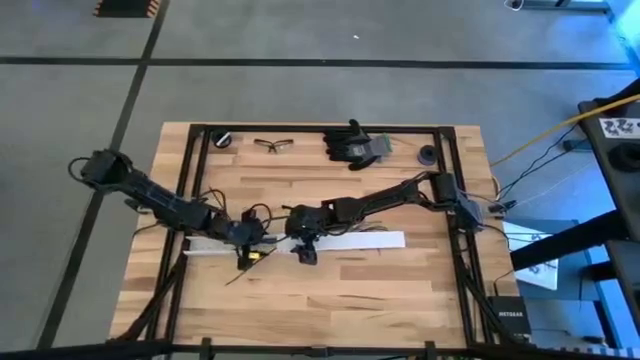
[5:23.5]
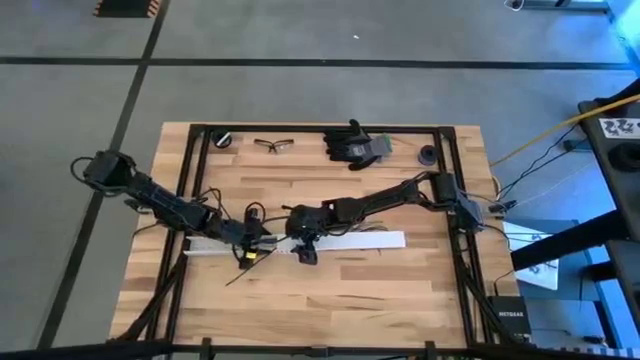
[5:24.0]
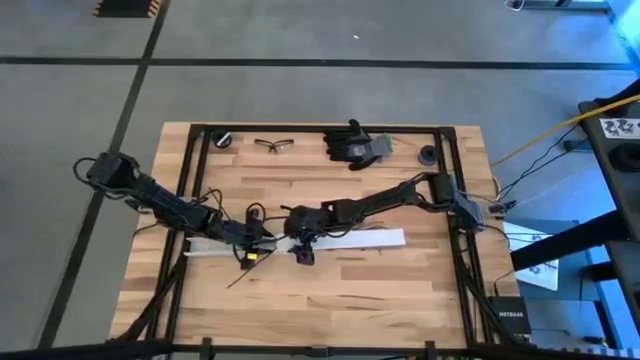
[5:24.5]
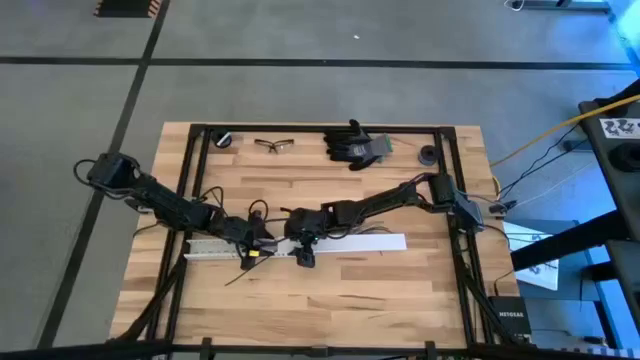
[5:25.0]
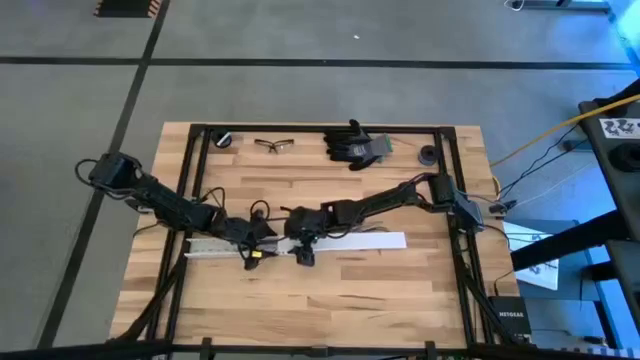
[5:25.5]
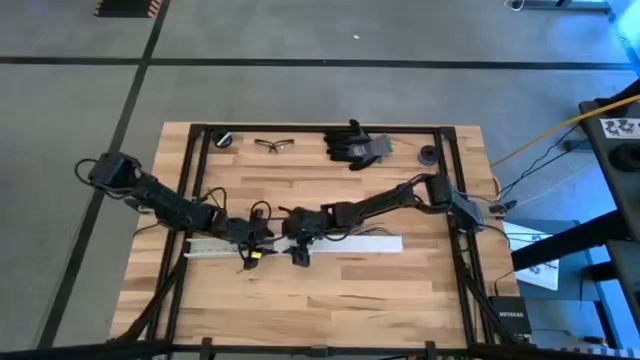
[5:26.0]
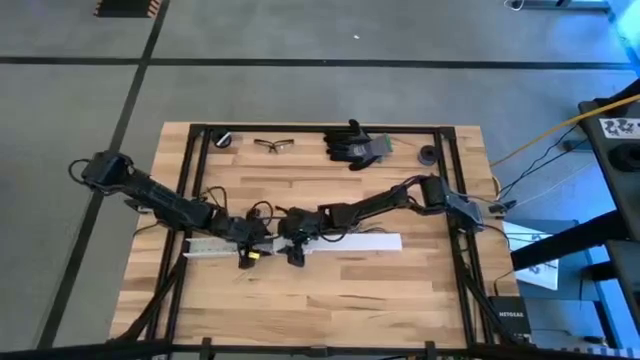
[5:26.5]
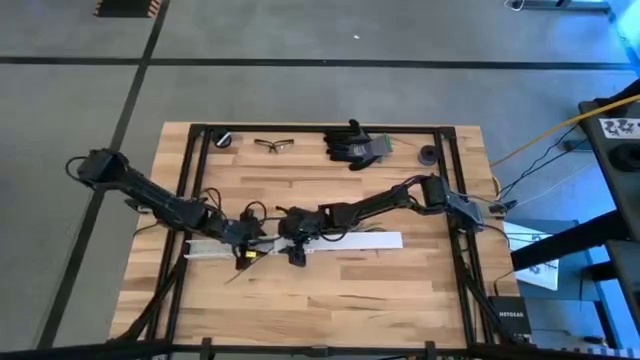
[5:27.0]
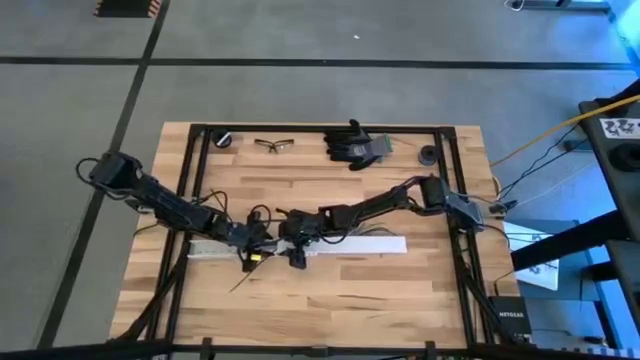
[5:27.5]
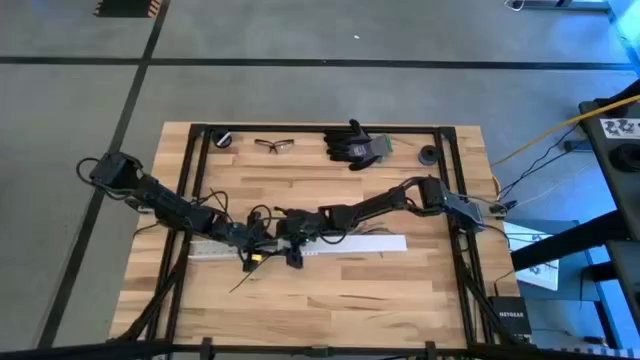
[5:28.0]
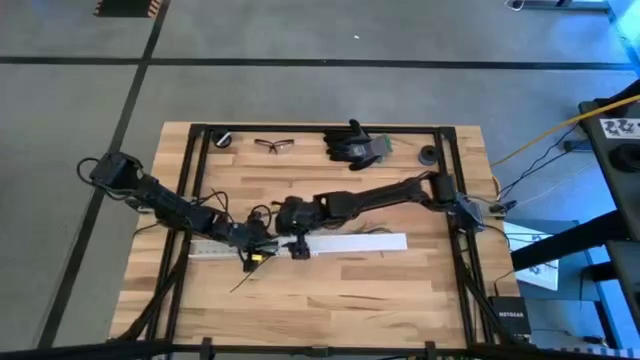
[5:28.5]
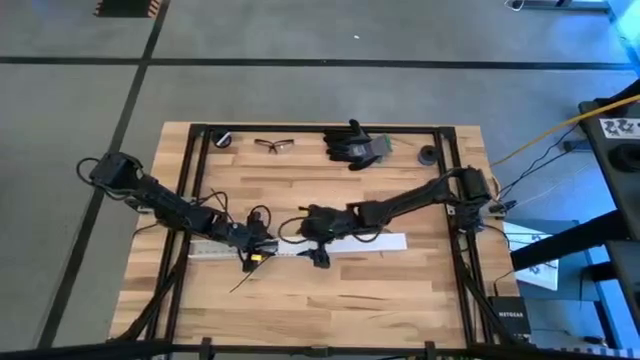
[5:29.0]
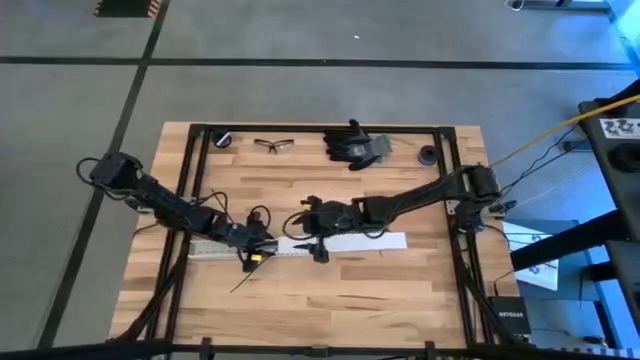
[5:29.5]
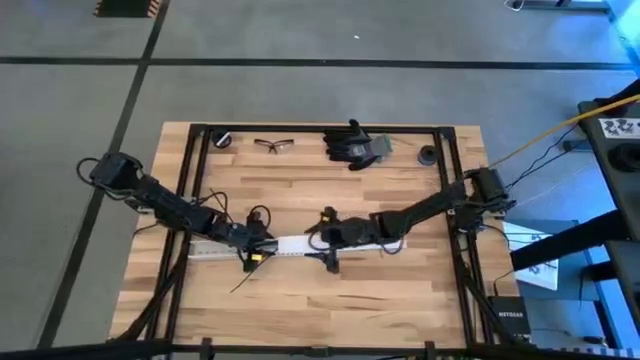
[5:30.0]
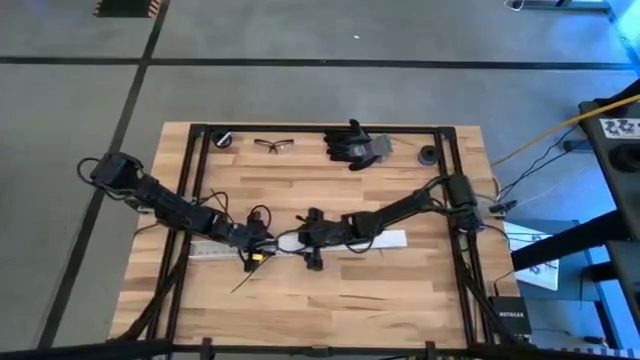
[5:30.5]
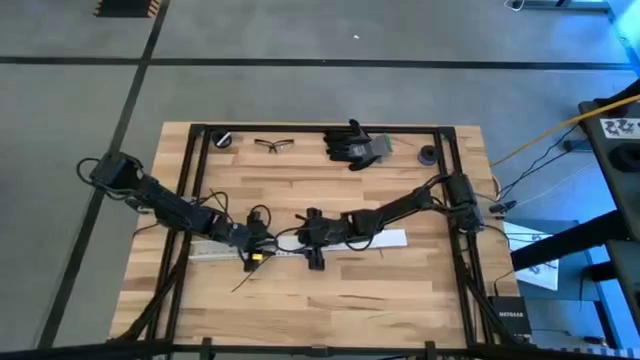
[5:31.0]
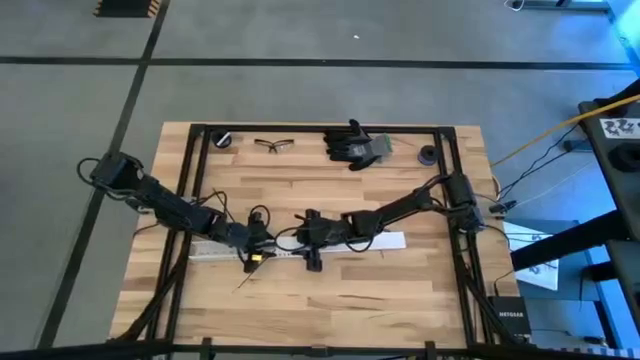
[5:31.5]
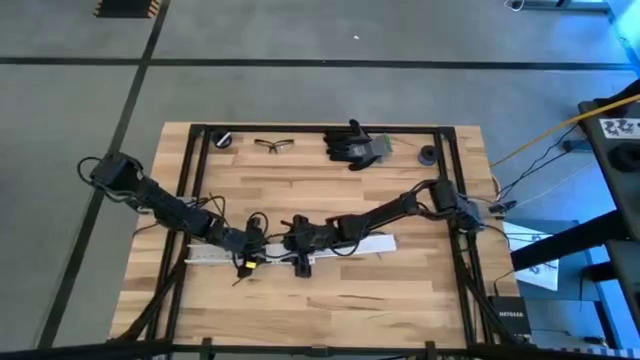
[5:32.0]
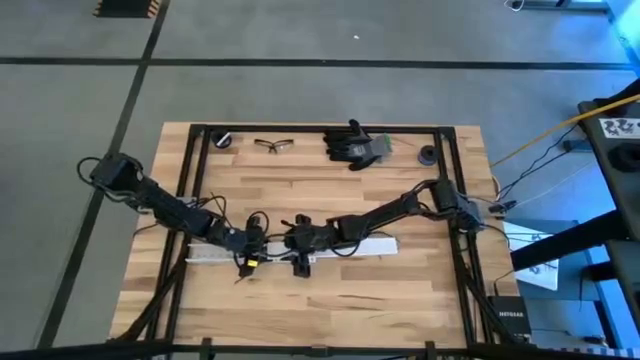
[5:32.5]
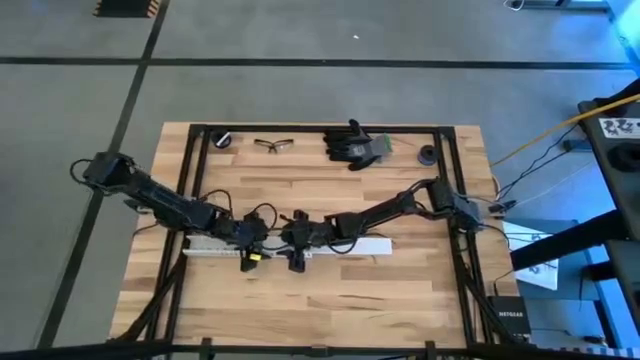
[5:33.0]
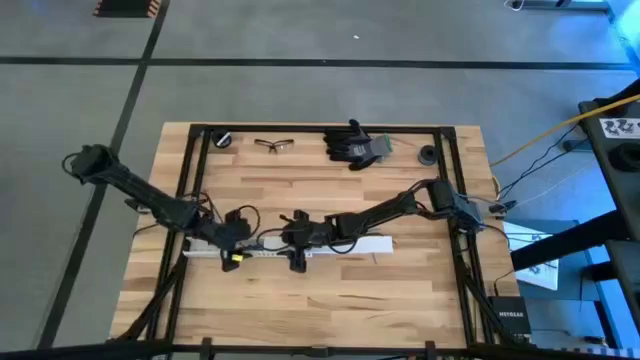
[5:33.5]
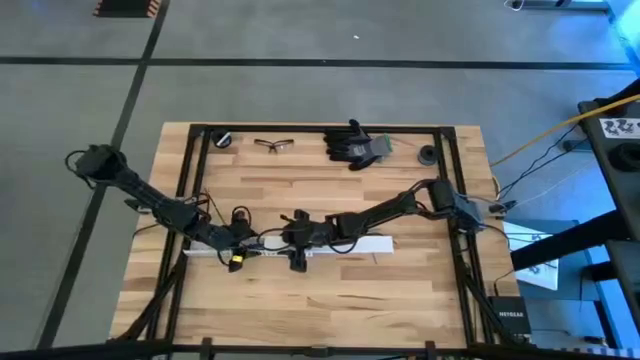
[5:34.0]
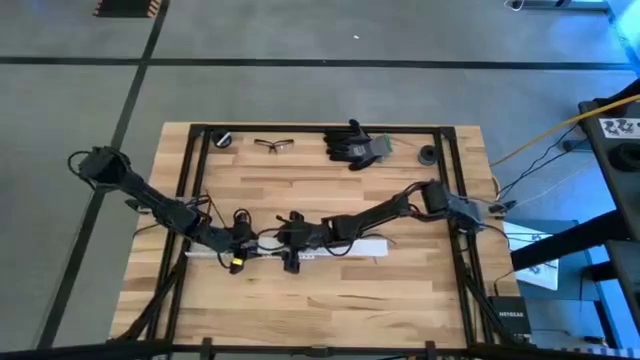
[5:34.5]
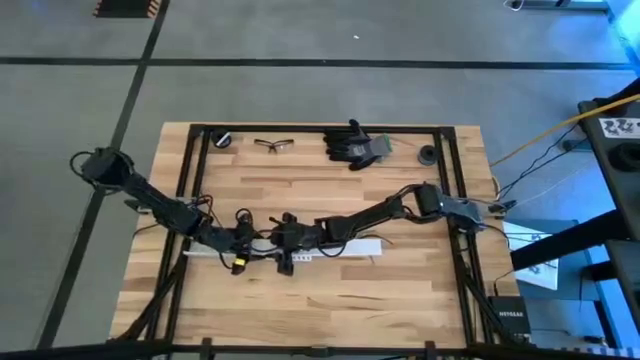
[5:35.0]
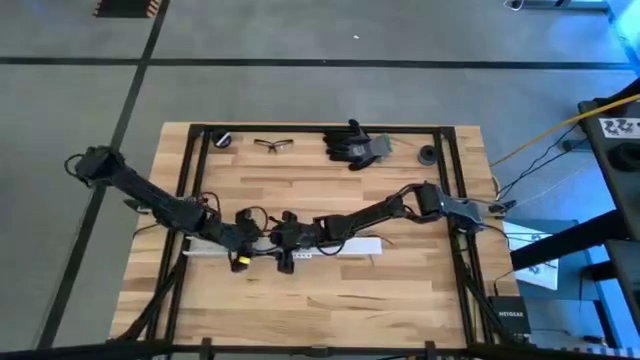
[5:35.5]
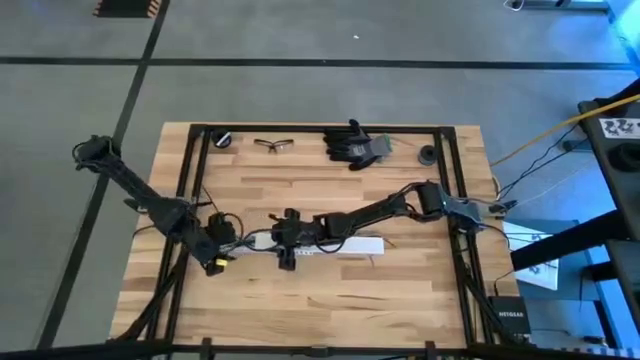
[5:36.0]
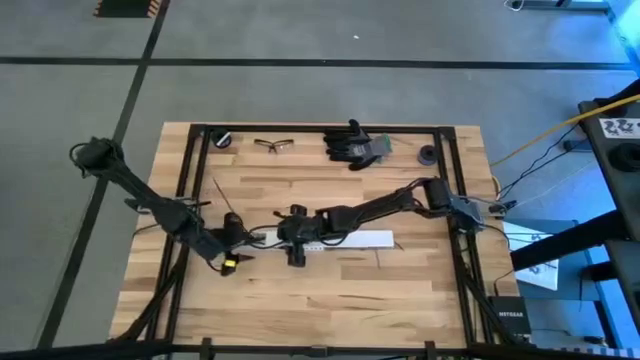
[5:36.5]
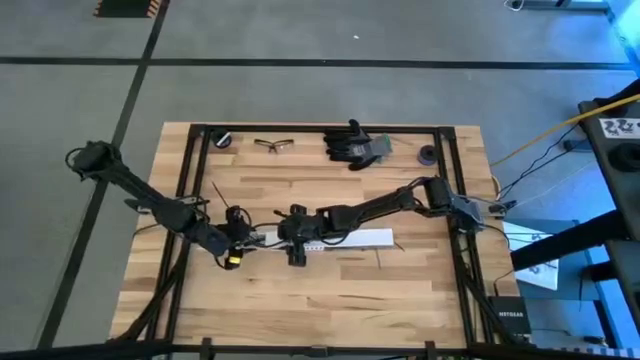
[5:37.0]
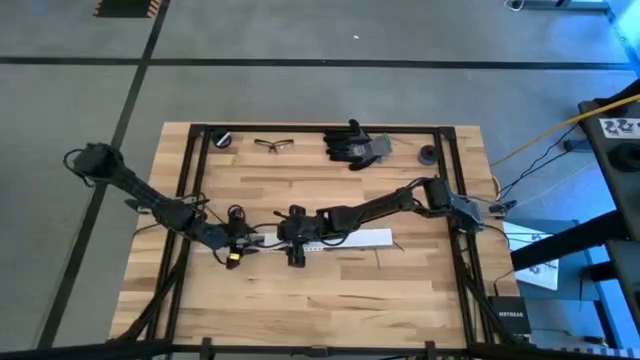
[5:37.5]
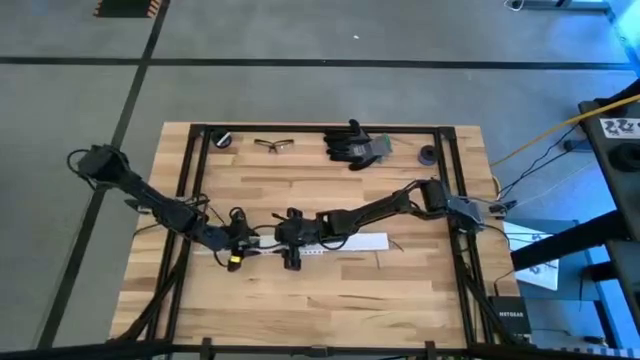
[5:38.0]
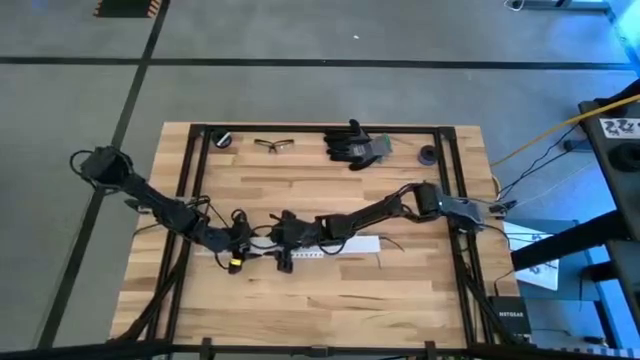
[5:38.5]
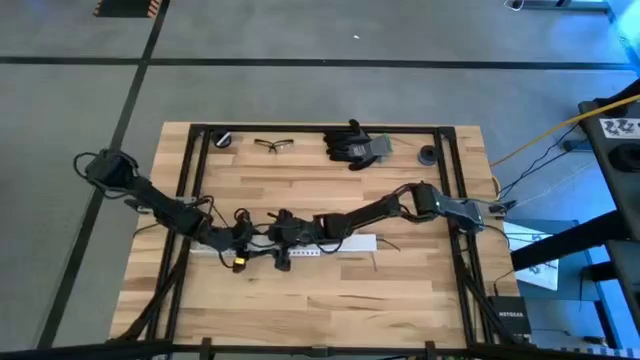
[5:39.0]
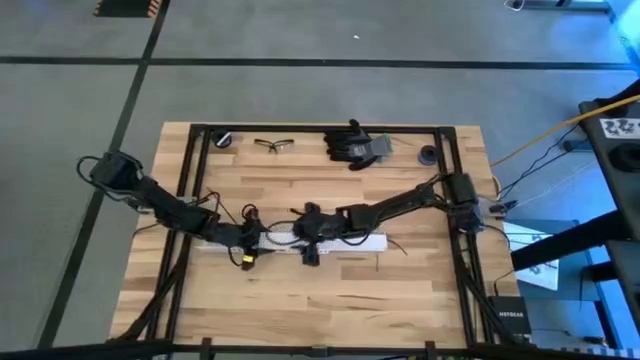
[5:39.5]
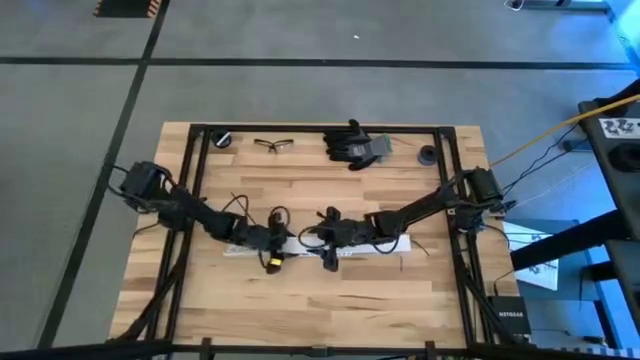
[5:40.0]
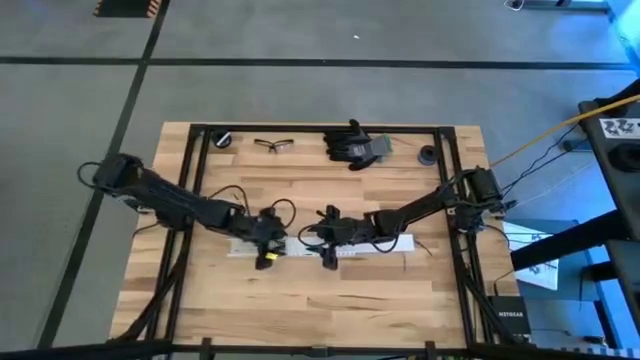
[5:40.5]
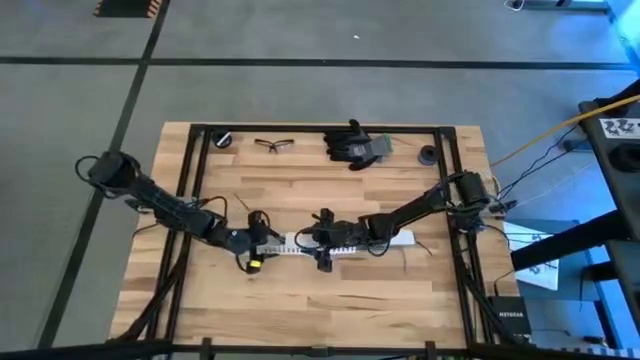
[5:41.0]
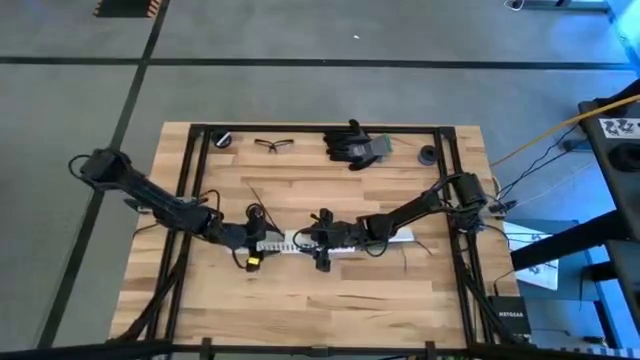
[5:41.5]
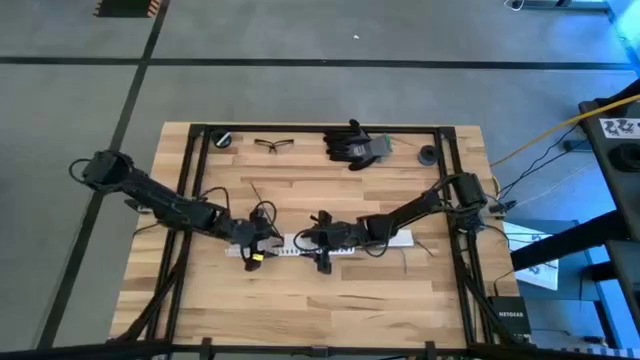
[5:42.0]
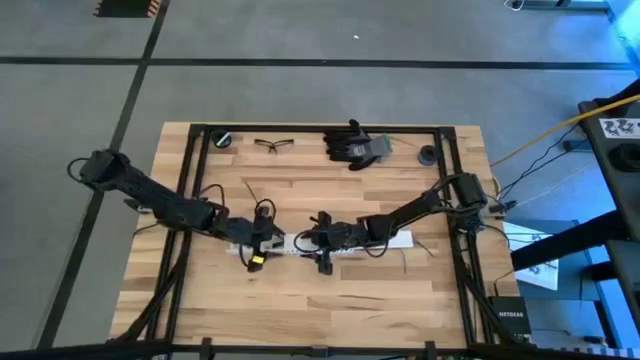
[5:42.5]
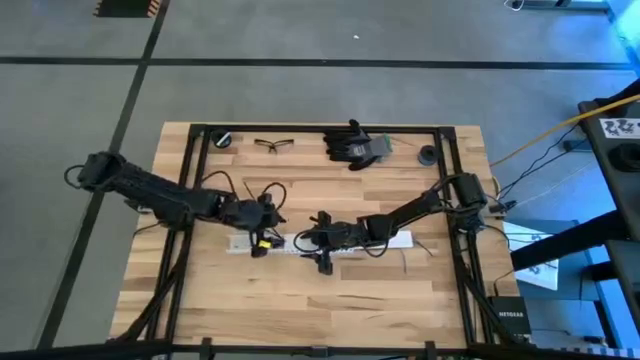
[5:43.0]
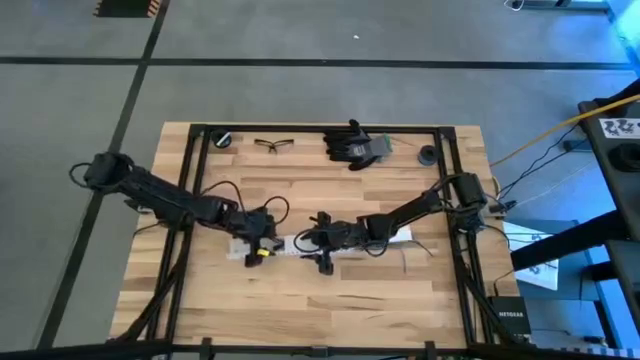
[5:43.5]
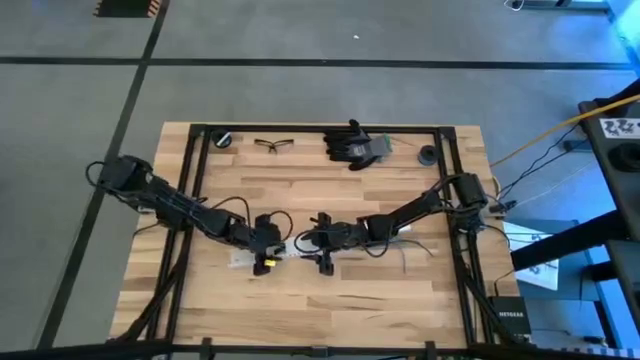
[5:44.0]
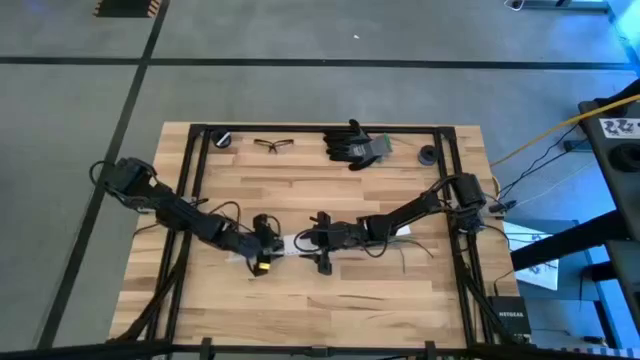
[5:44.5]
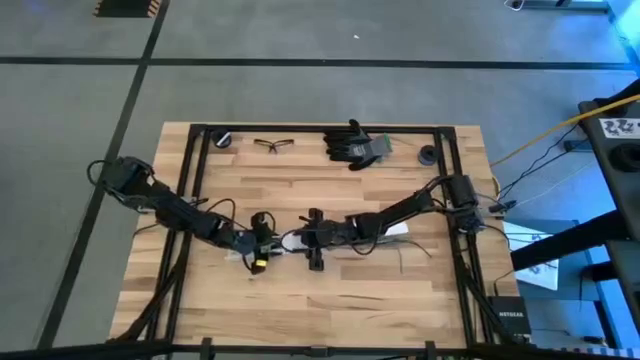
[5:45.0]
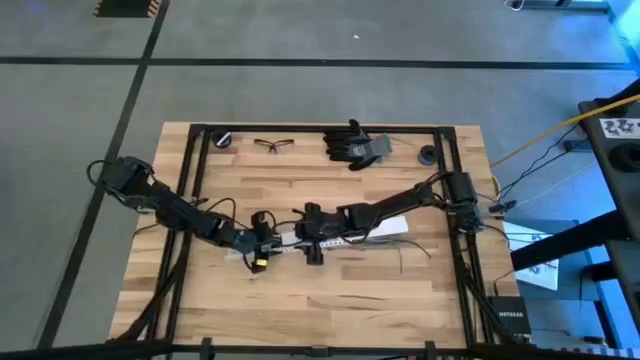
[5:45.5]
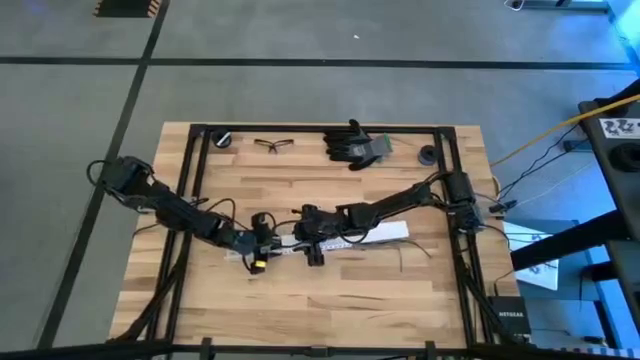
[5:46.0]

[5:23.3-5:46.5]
Task: Ziptie cables
Close the white cable duct

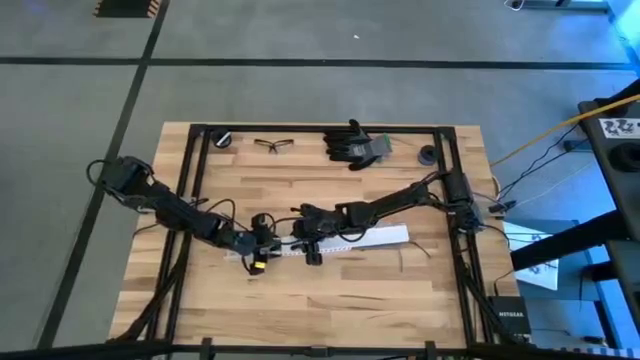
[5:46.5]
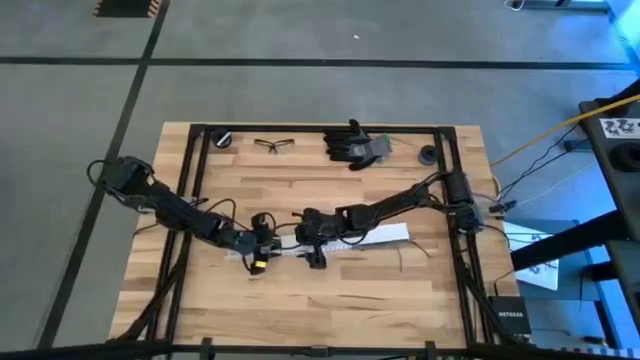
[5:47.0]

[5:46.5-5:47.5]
Close the white cable duct
